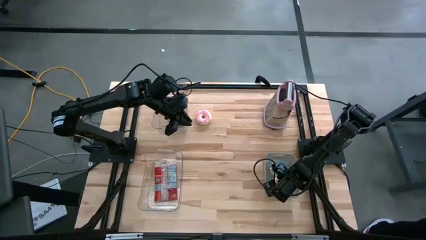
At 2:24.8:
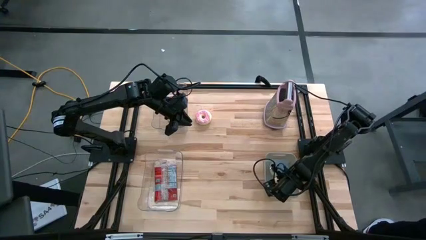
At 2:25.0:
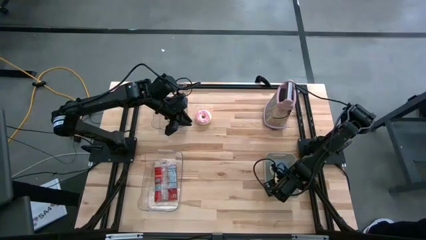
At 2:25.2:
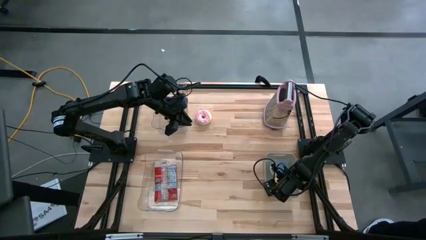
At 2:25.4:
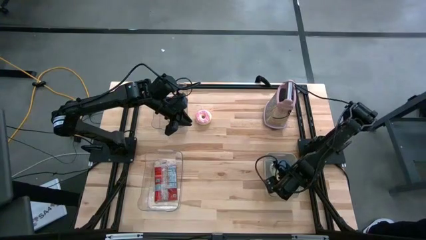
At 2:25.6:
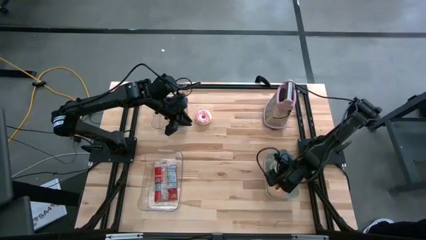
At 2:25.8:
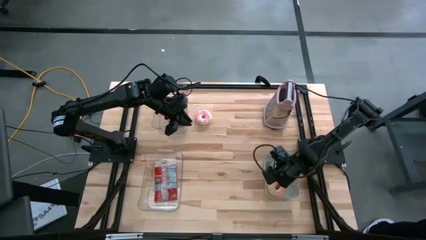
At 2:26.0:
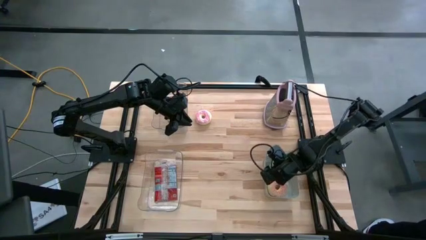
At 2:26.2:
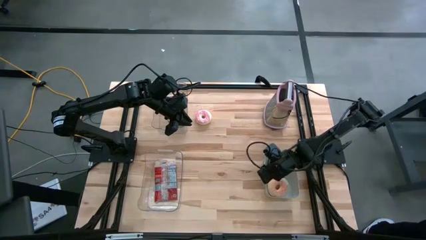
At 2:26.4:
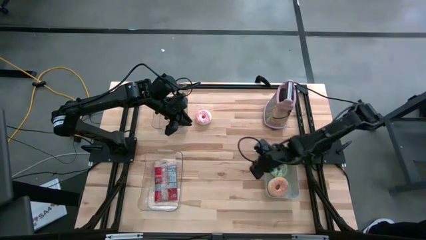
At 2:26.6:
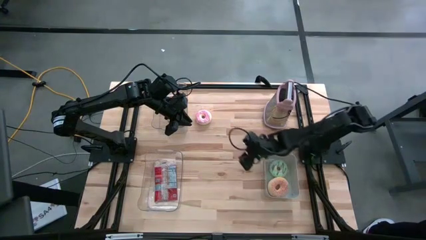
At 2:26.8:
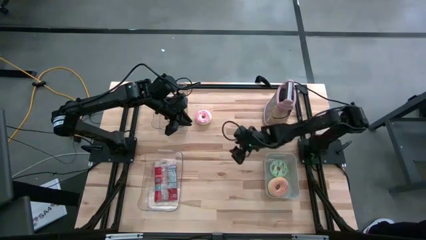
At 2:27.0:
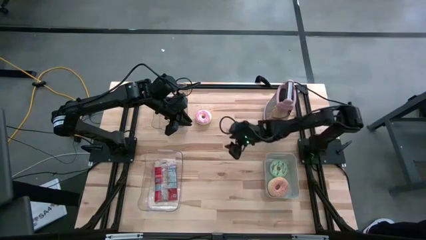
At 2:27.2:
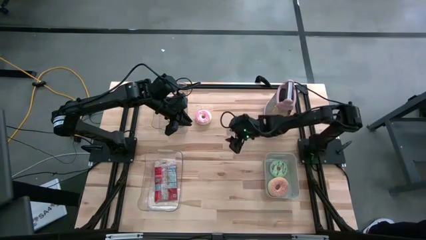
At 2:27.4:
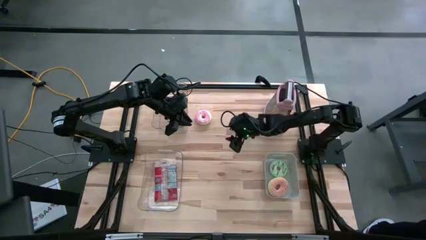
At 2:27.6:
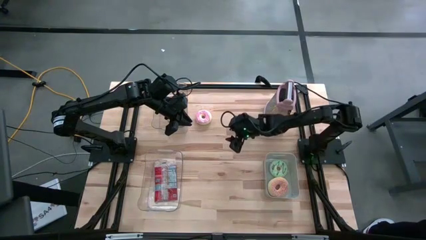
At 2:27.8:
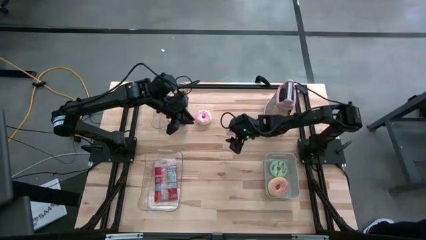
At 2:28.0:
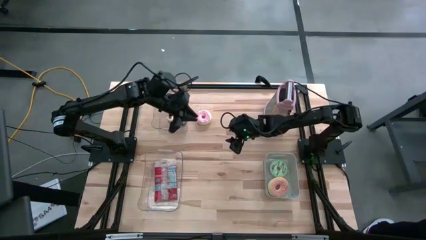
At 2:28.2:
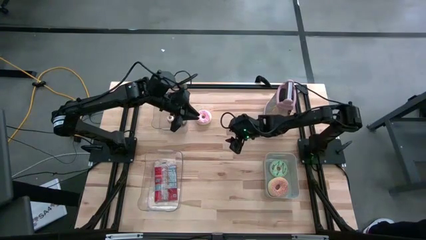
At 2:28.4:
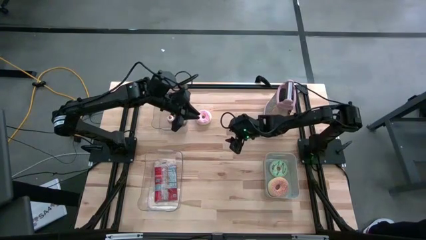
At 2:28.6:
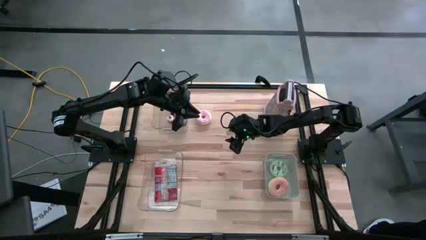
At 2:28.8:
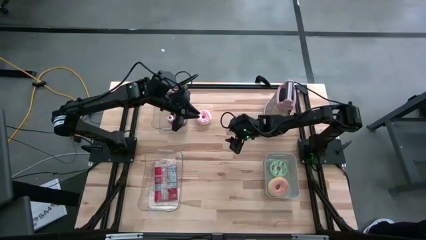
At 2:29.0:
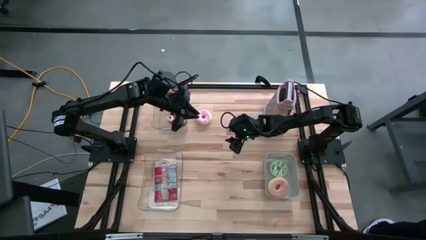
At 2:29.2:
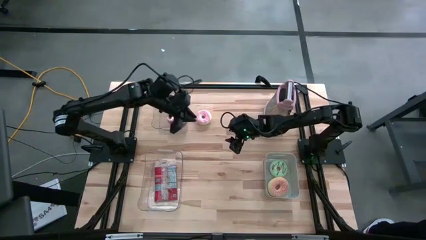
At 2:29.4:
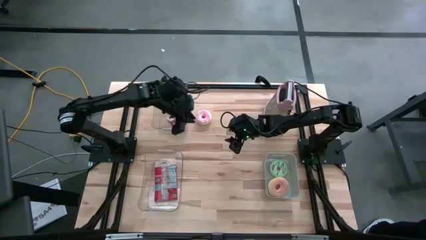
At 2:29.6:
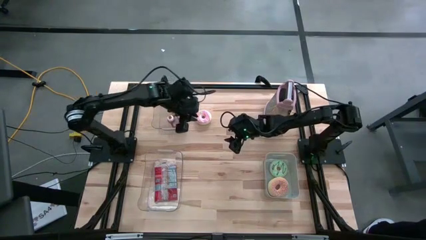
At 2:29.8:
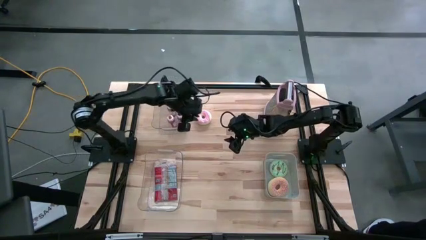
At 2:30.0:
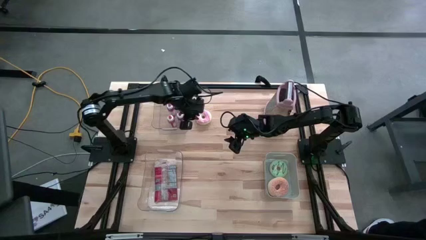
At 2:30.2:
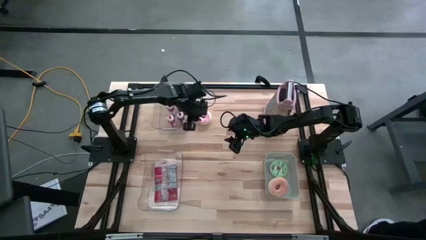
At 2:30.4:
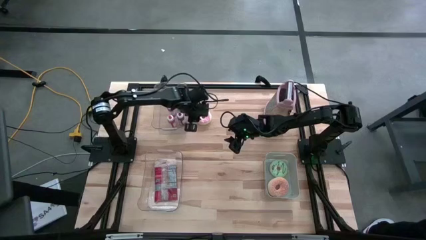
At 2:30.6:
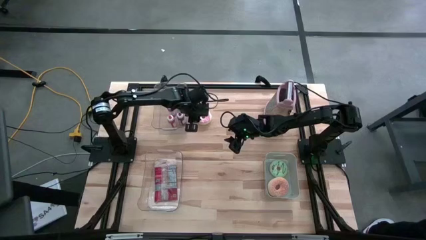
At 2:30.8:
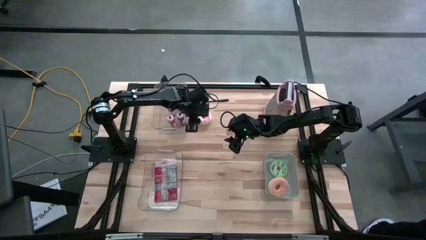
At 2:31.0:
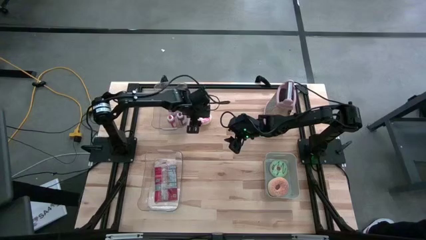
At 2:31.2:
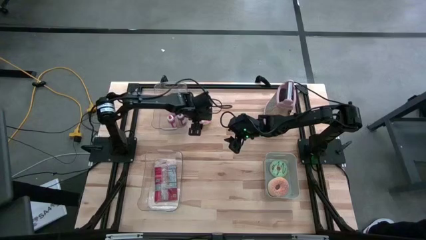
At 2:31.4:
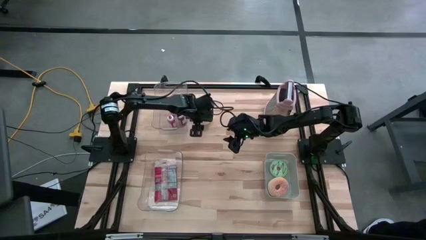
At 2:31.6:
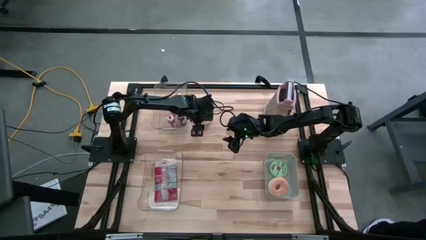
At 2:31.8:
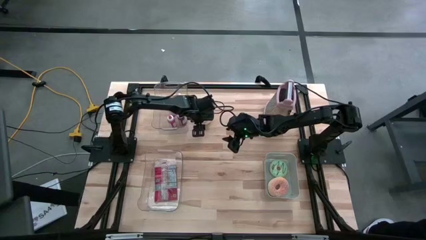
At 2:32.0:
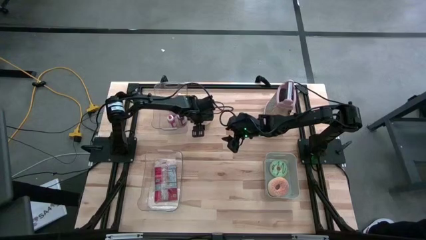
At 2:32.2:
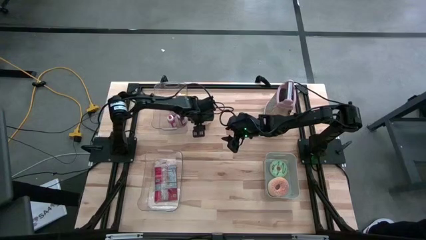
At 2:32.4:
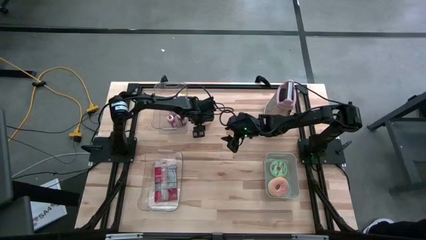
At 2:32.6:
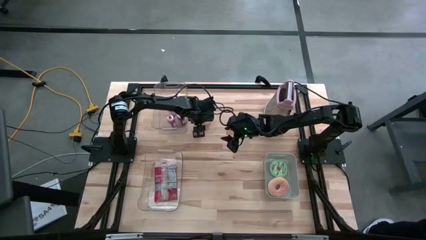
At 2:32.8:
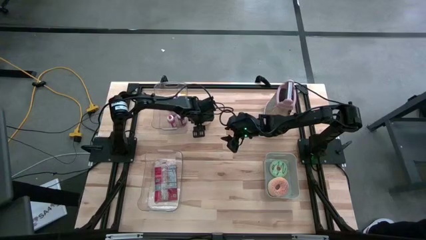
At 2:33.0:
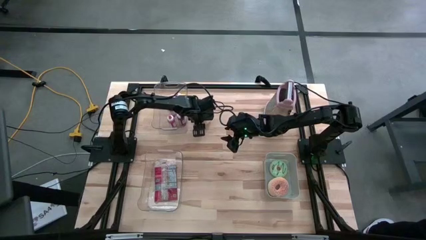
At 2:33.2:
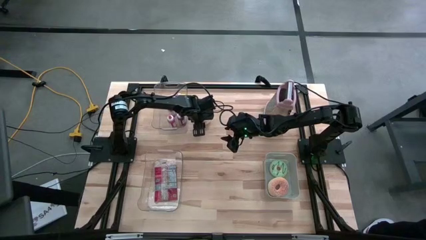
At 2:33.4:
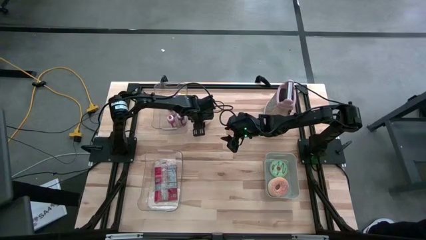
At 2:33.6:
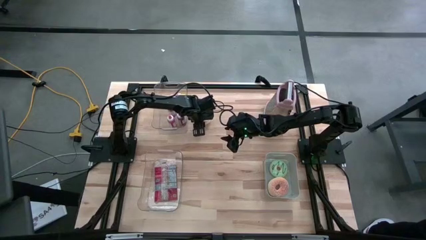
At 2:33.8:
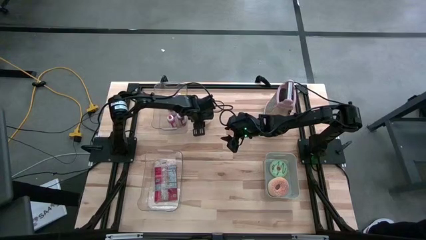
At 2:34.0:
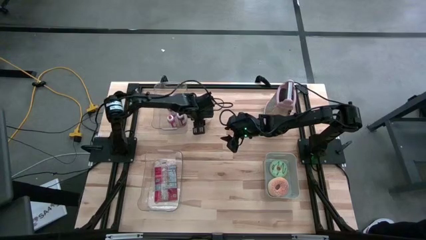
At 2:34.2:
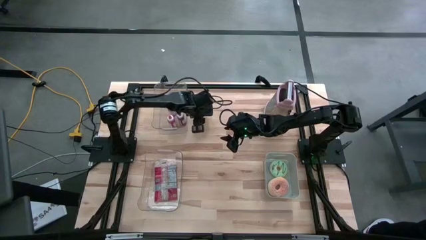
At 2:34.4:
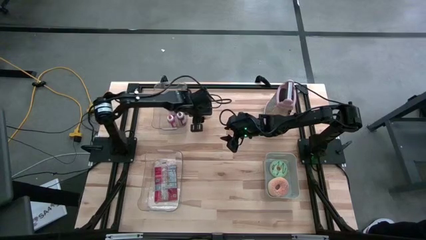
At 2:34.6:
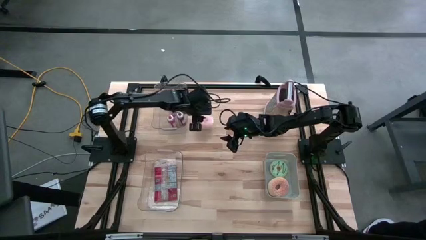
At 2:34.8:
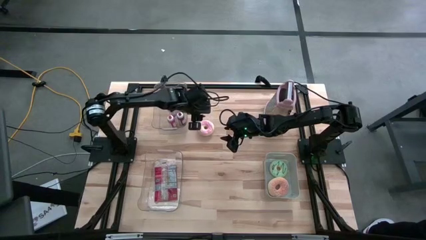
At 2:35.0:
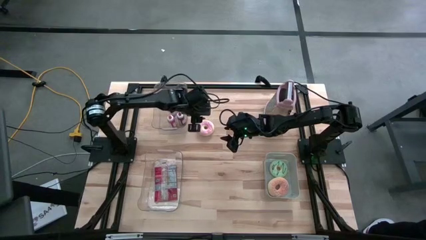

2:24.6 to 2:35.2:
Put the pink donut into the gray bin
